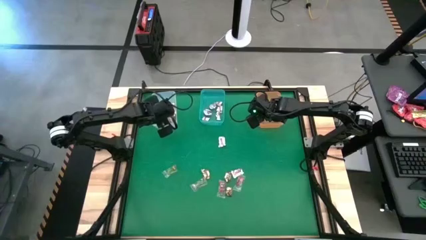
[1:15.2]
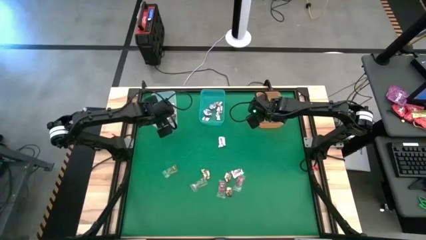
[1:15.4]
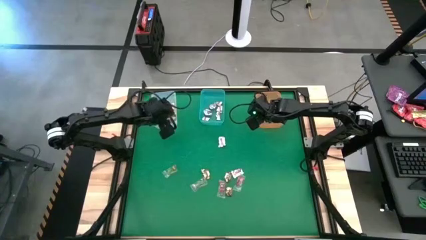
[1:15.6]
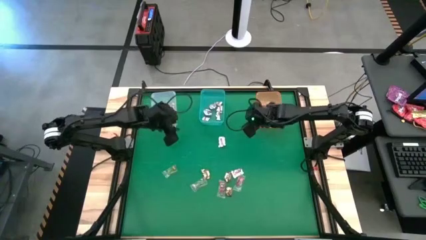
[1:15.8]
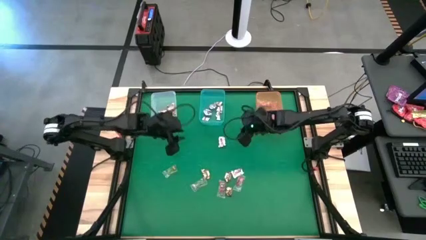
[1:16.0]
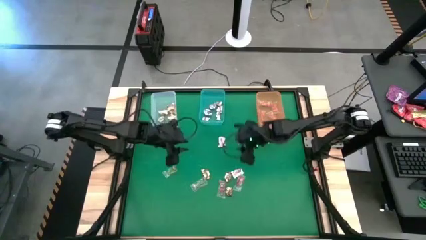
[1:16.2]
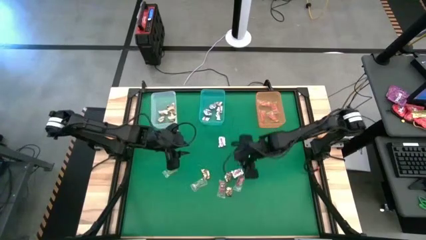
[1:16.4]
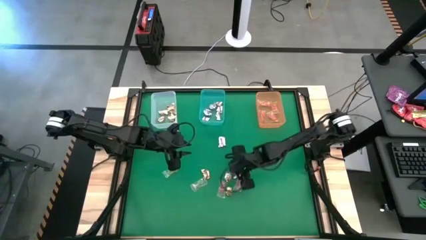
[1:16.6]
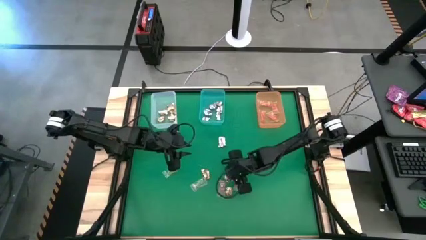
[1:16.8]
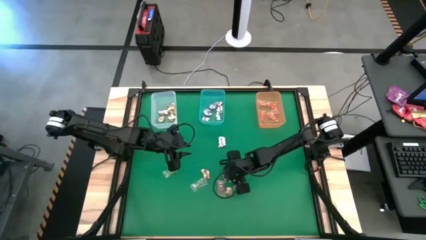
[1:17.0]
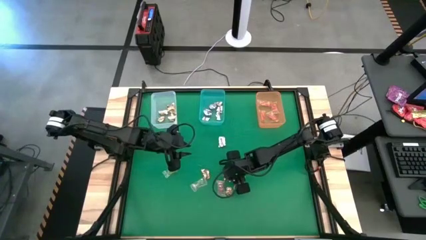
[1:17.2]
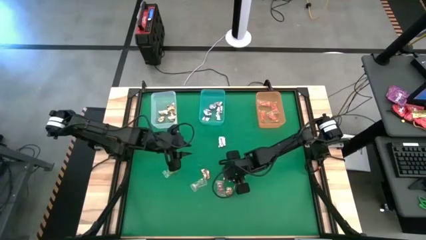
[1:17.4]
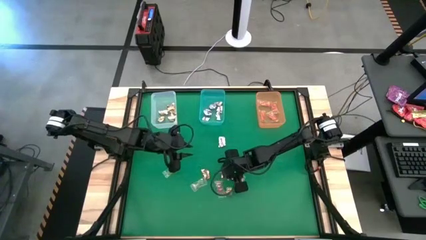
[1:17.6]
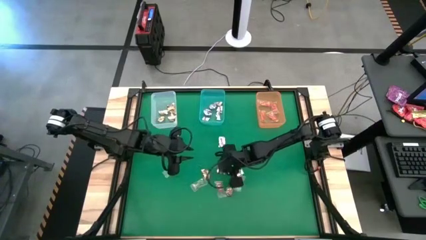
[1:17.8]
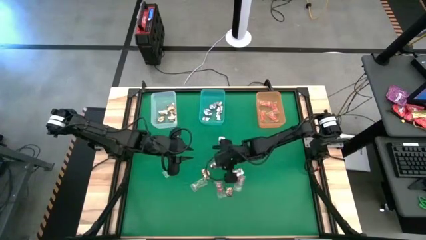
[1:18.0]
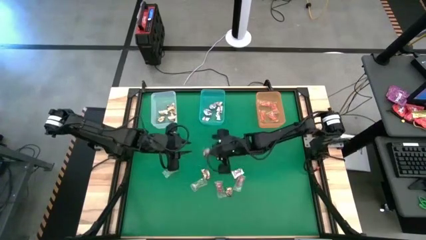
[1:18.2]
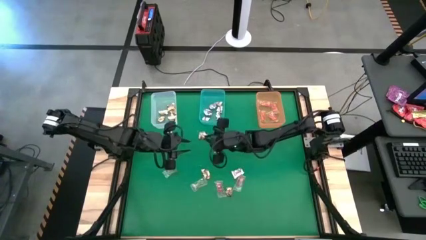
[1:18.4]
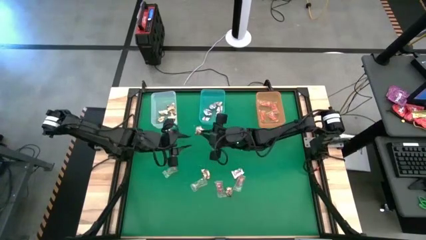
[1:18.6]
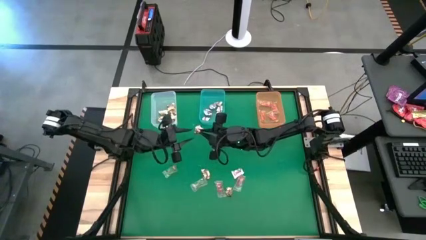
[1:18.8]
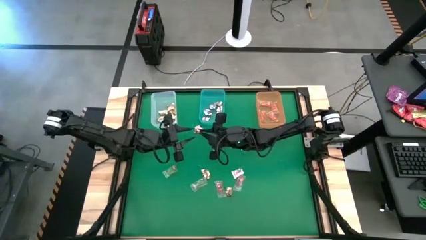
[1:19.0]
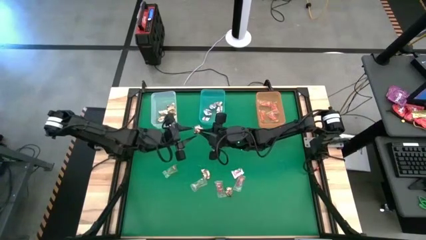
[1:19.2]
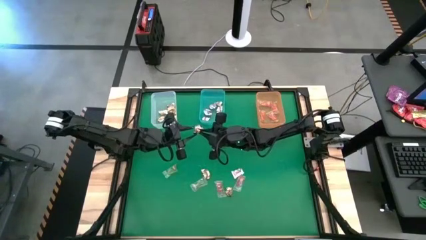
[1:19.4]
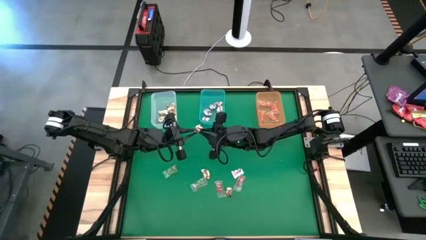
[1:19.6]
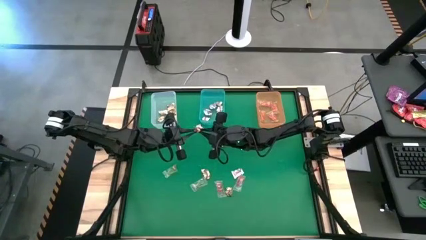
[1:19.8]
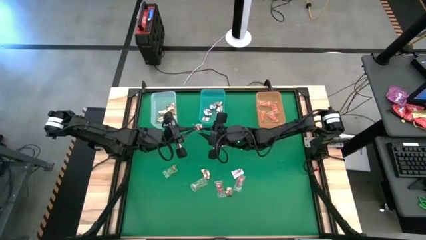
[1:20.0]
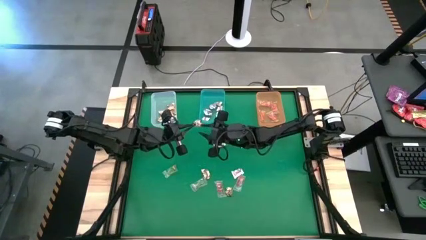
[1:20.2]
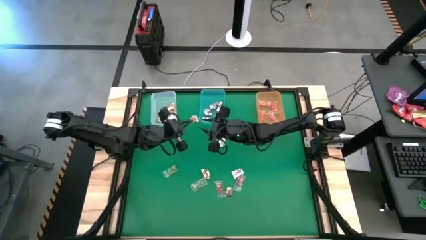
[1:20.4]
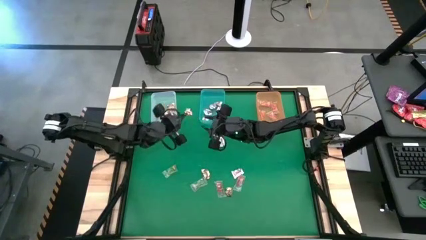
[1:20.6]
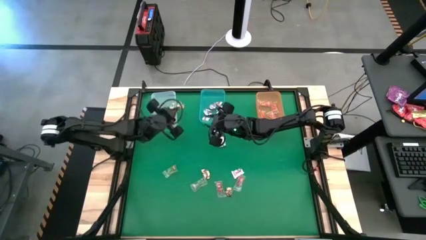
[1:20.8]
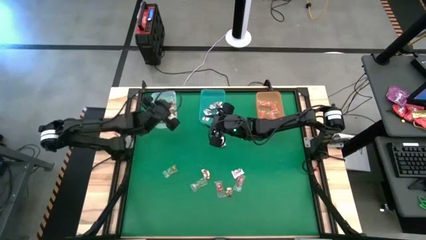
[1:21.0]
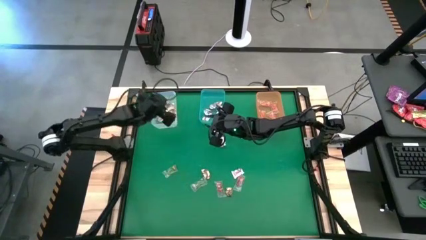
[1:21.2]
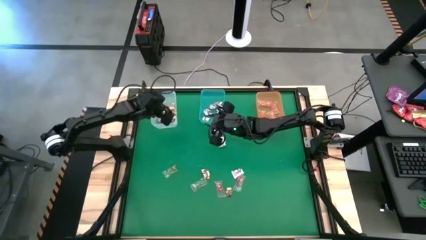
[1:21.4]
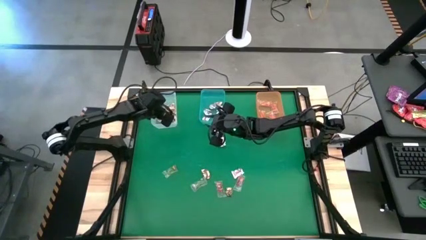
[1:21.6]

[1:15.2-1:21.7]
Task: Sort candy by brand, put in halloween buckets
Put the gold wrap candy into the white bin

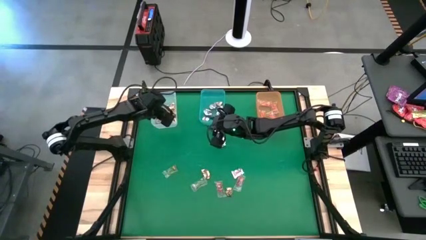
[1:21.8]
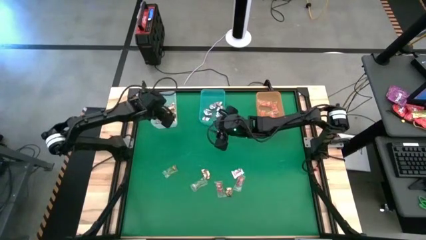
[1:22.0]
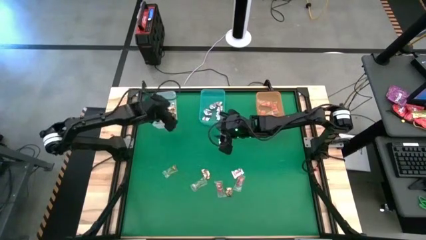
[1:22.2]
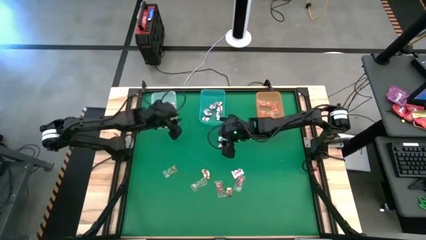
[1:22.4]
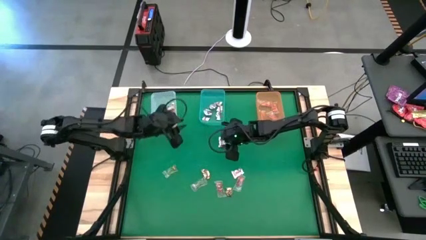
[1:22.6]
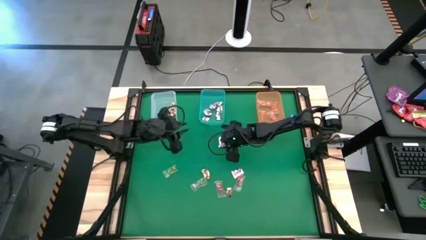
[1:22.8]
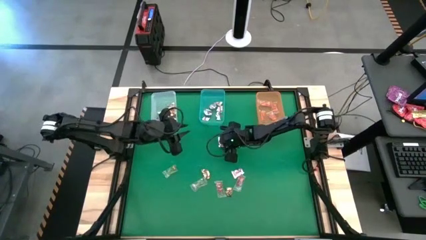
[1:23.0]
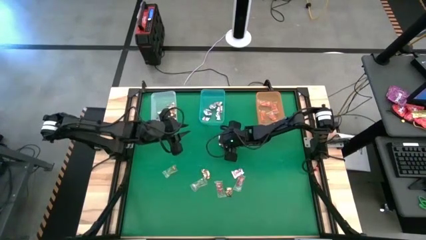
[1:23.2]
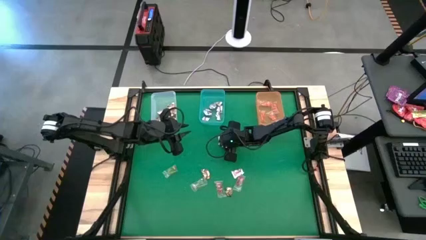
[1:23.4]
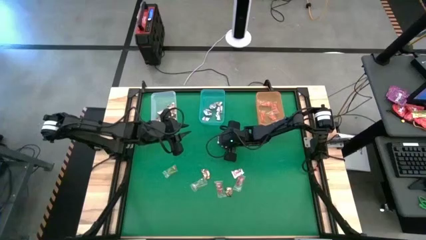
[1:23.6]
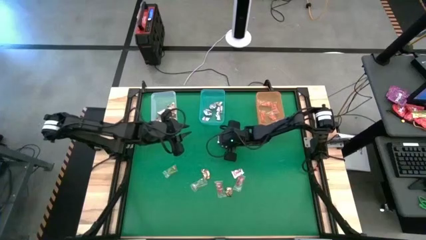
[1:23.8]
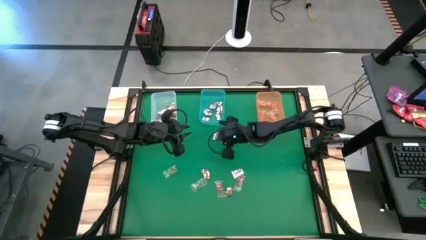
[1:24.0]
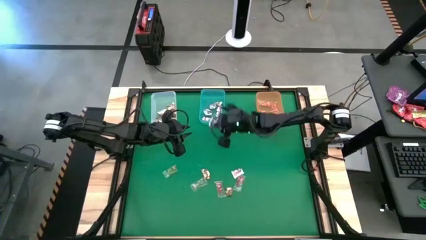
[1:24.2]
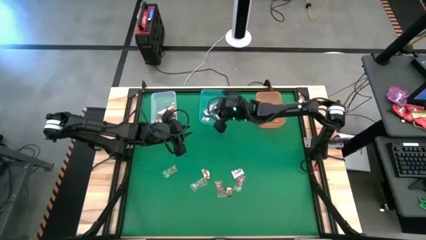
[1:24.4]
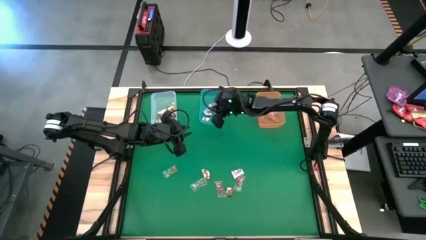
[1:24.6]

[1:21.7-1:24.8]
Put the silver wrap candy into the blue bin

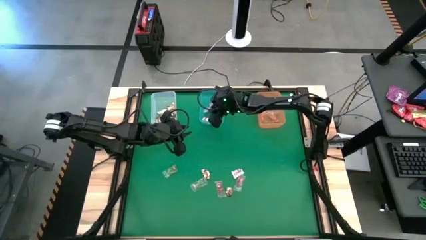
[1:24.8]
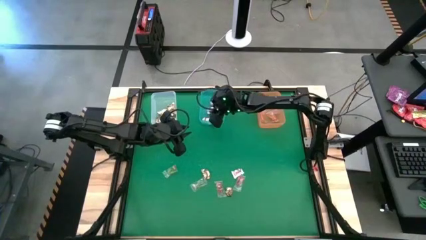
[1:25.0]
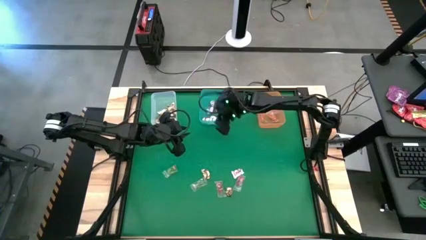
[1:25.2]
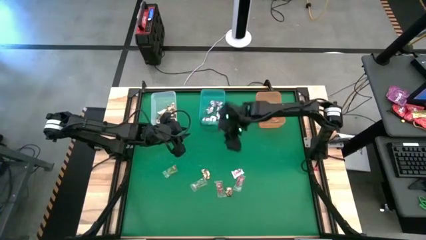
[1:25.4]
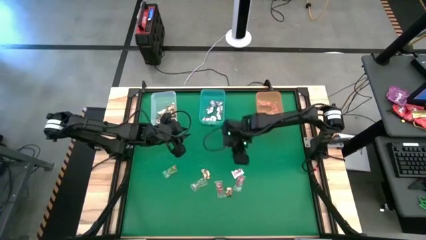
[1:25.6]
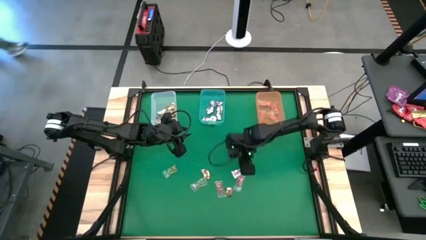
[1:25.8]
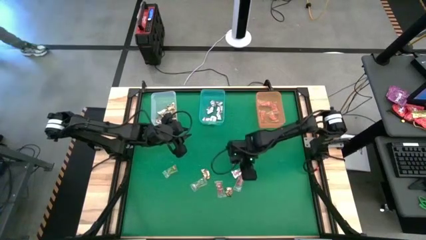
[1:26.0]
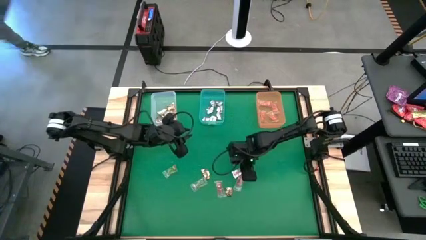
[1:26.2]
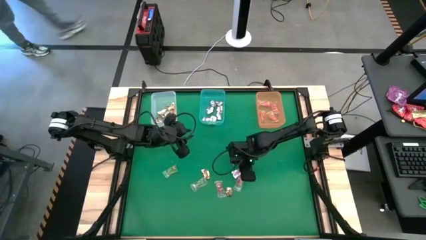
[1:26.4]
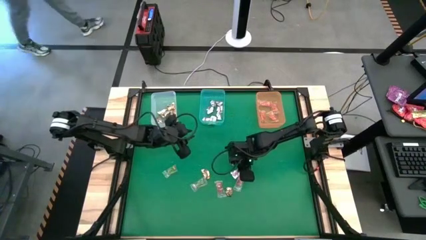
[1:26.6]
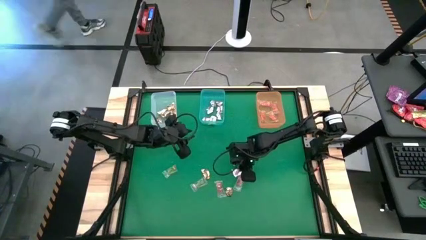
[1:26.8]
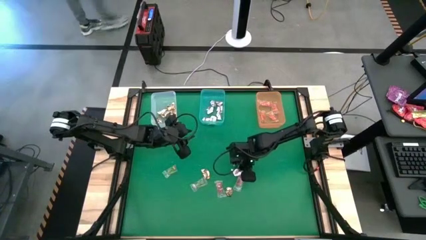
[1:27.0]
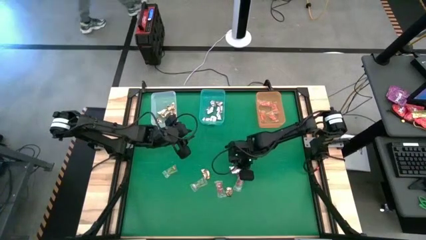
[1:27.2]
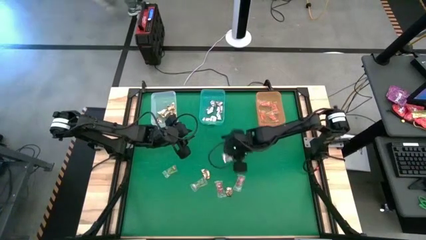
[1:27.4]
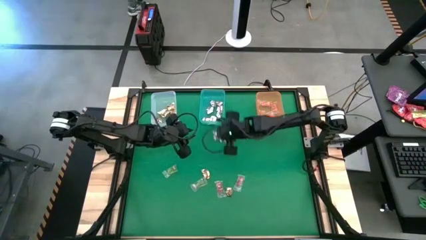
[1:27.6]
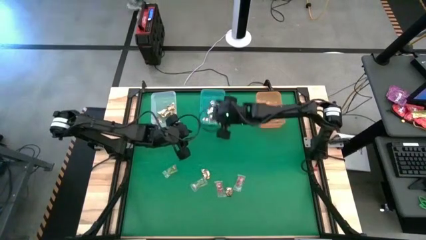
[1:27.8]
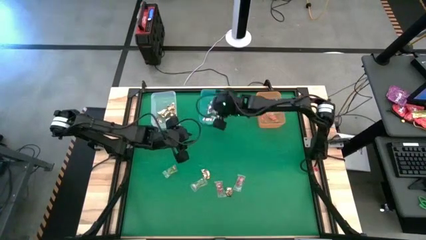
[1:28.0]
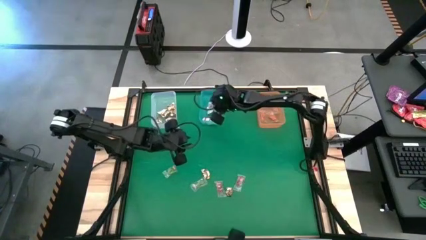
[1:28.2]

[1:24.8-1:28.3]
Put the silver wrap candy into the blue bin

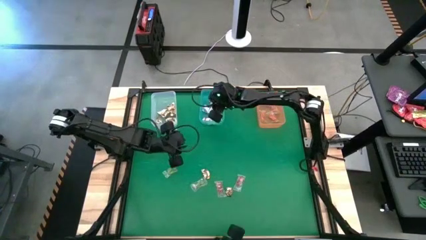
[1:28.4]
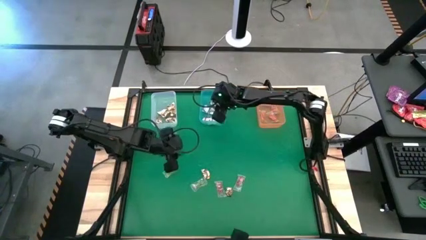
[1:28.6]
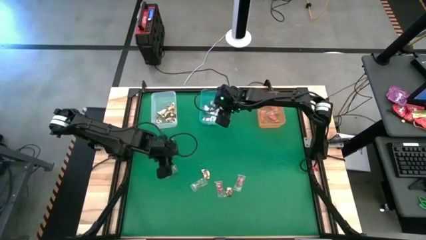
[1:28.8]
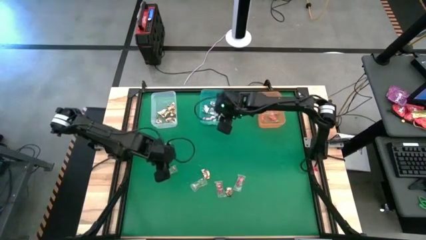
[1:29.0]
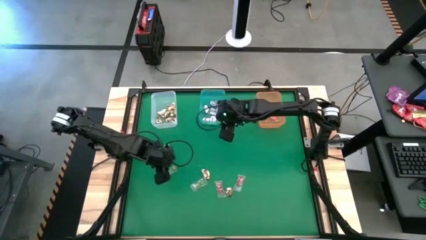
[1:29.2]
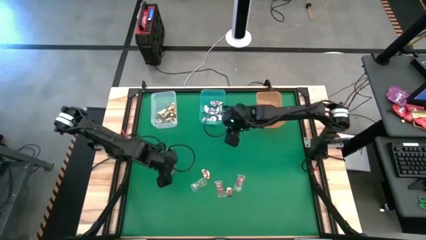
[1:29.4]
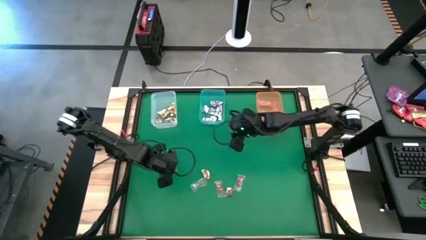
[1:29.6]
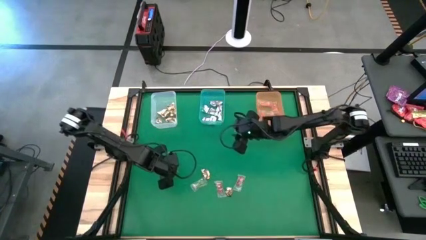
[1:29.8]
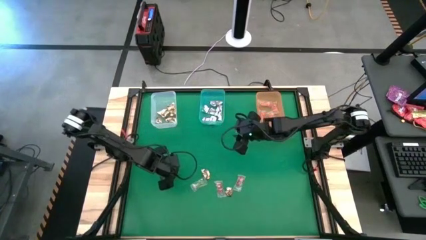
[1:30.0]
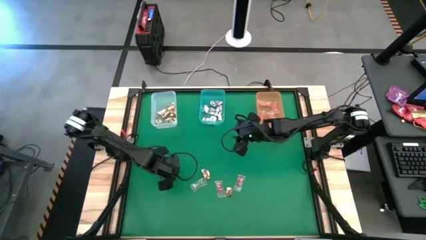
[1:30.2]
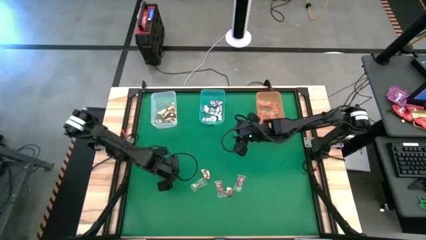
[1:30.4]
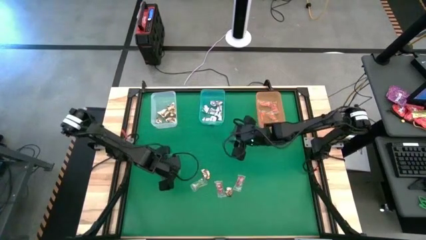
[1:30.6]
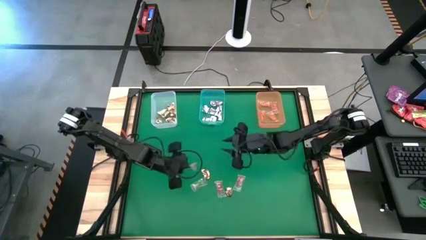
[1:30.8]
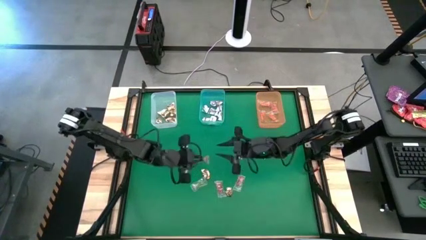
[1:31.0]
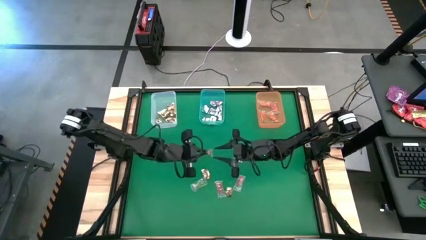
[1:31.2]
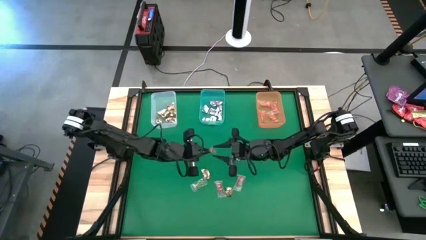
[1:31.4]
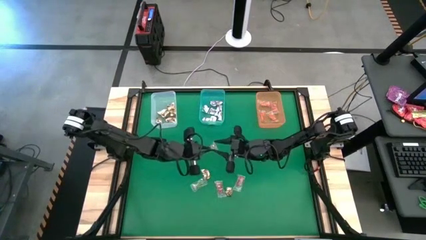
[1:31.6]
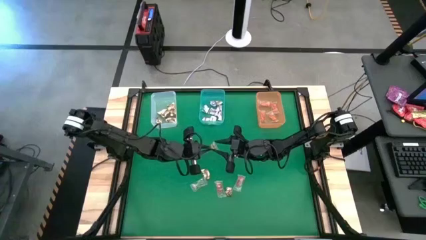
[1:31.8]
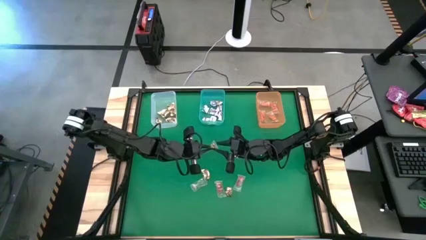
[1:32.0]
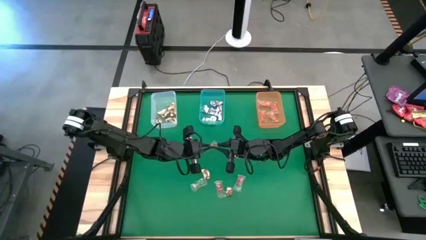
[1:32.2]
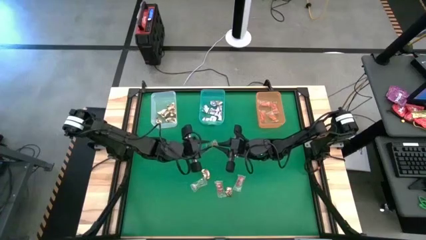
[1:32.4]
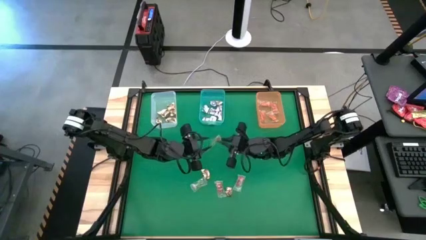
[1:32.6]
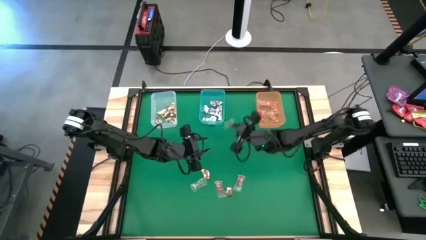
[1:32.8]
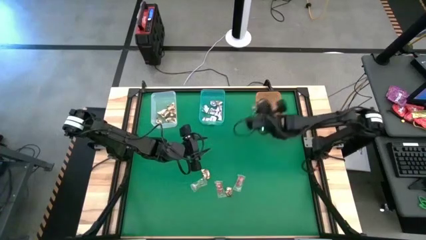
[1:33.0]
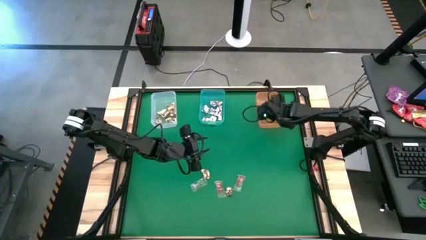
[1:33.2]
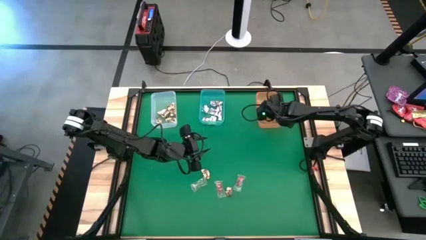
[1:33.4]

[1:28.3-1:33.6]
Put the green gummy into the orange bin
